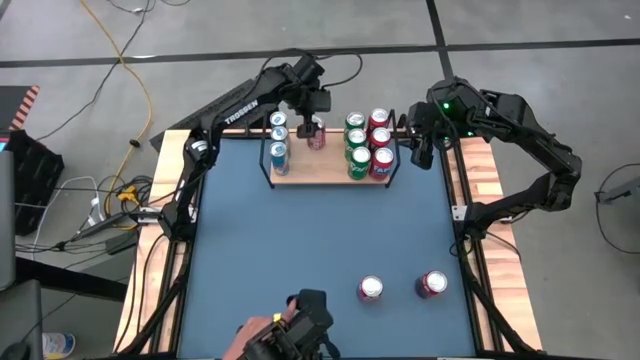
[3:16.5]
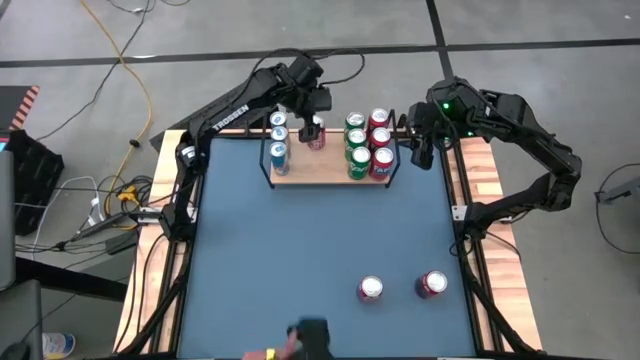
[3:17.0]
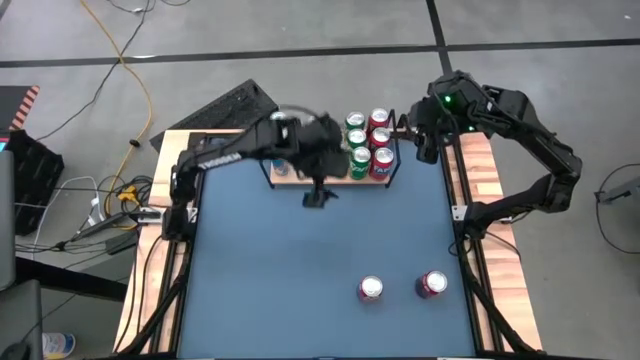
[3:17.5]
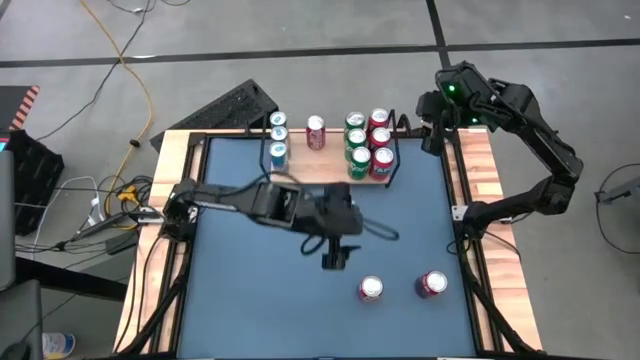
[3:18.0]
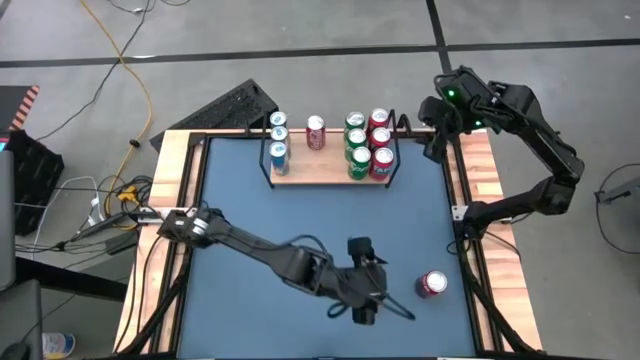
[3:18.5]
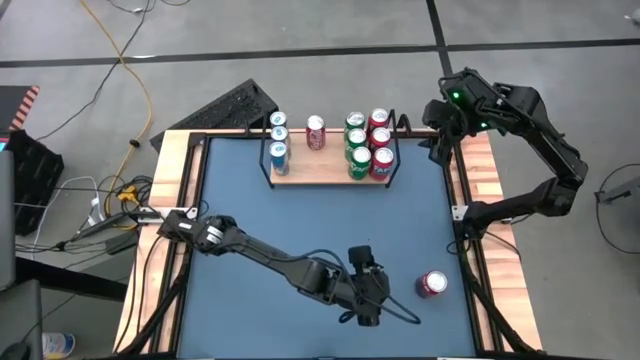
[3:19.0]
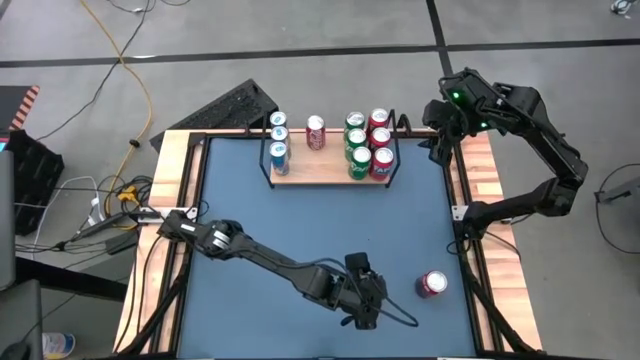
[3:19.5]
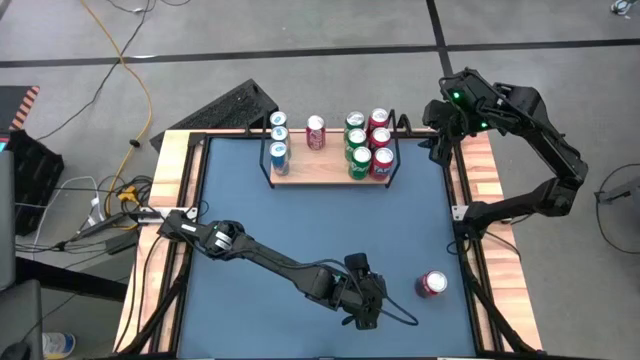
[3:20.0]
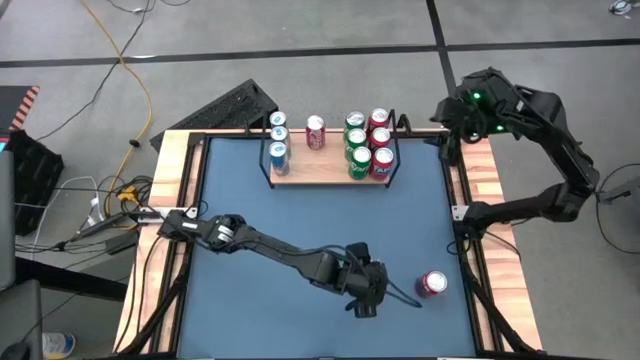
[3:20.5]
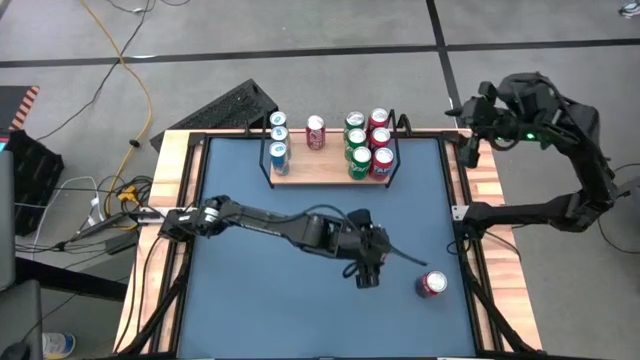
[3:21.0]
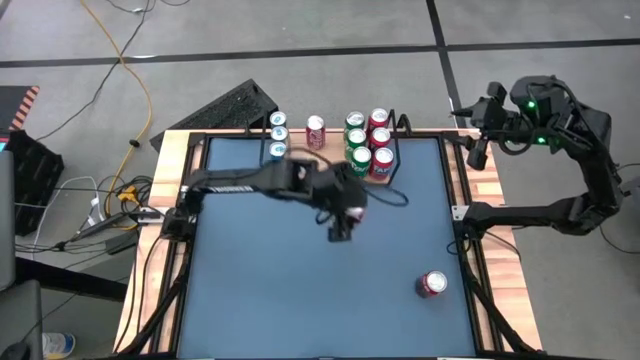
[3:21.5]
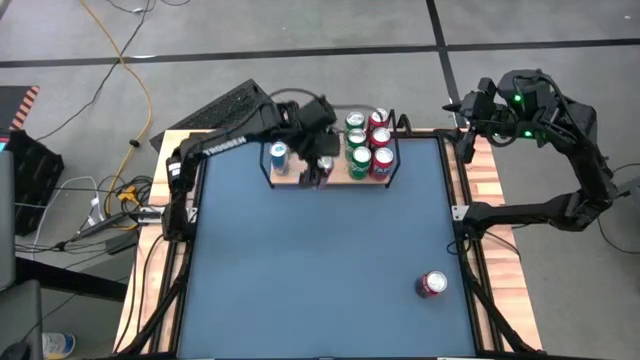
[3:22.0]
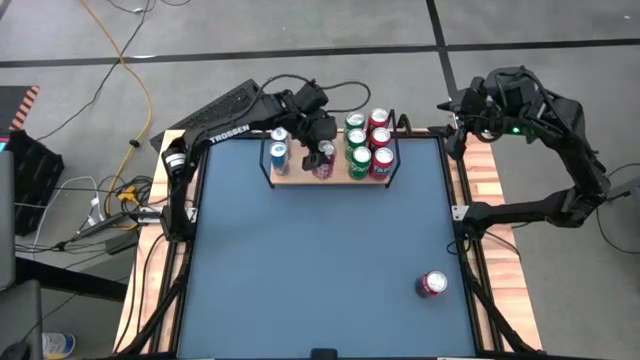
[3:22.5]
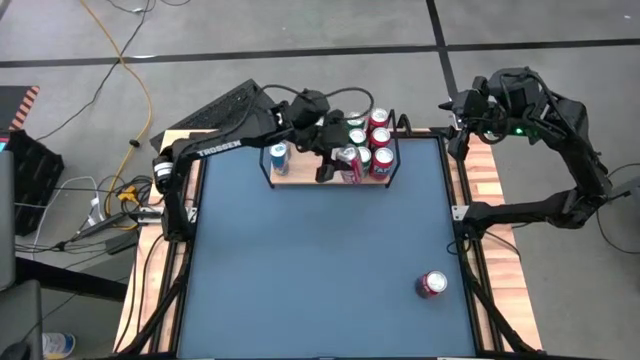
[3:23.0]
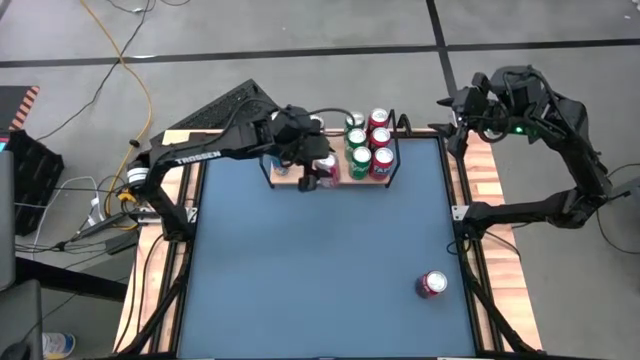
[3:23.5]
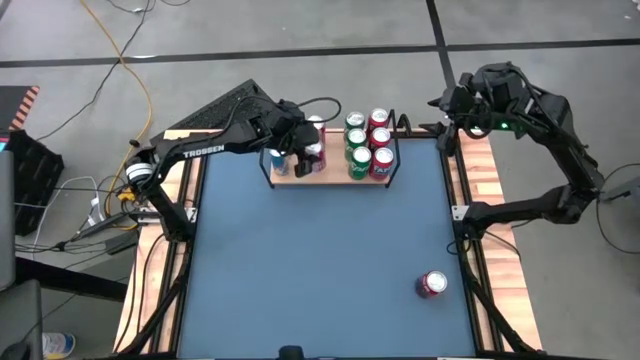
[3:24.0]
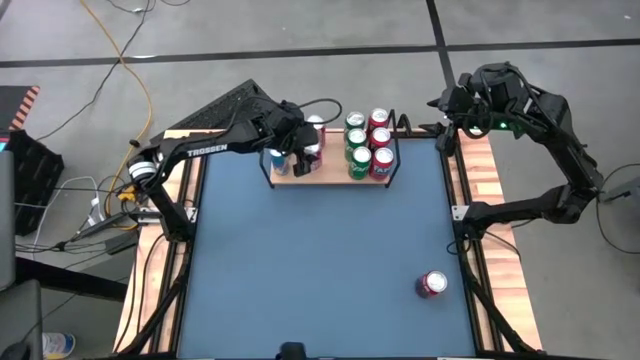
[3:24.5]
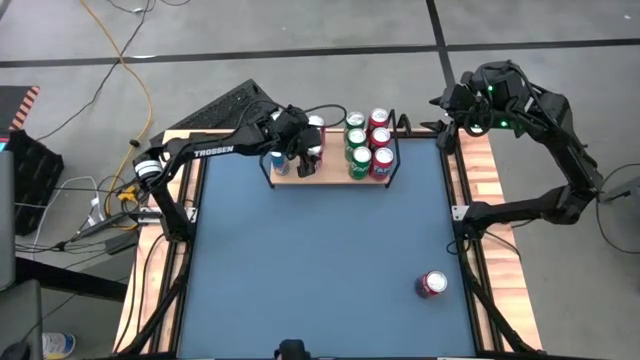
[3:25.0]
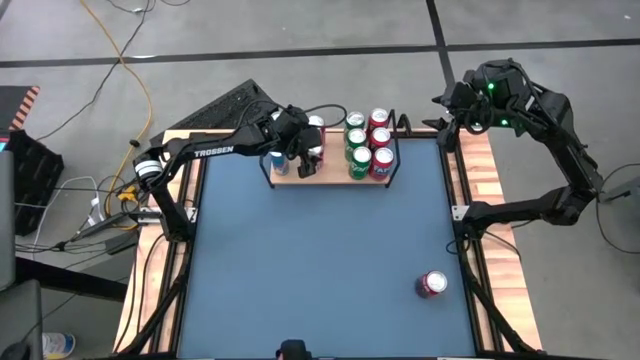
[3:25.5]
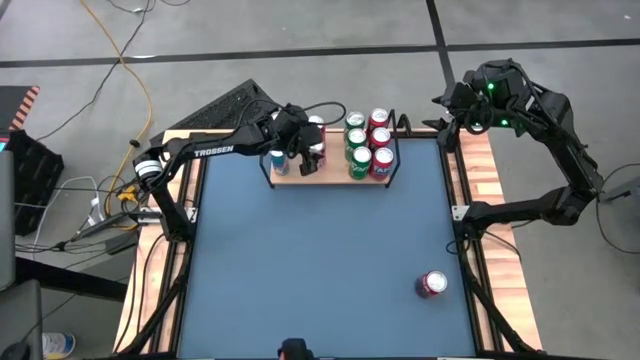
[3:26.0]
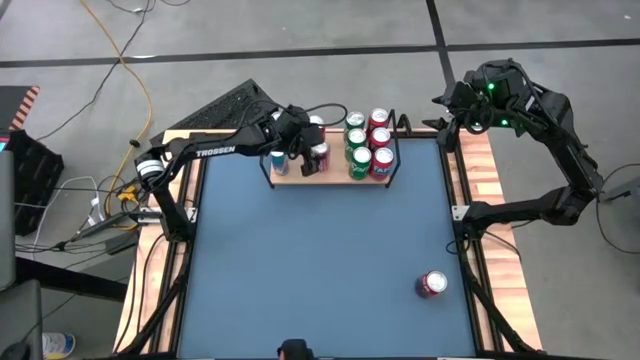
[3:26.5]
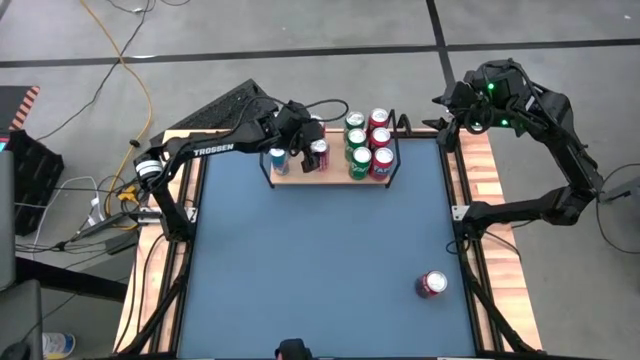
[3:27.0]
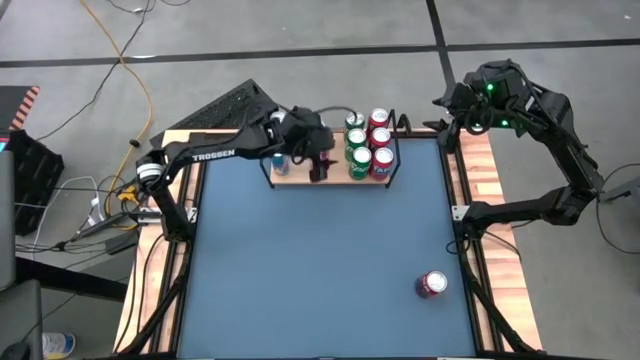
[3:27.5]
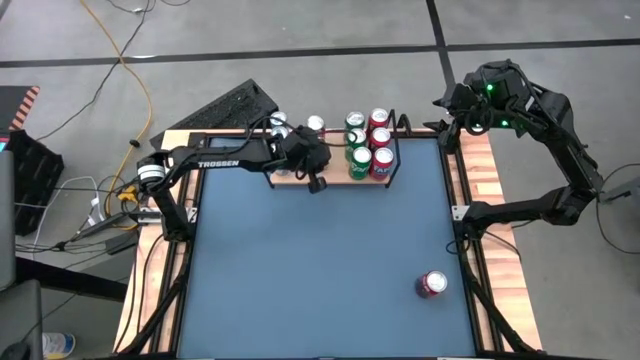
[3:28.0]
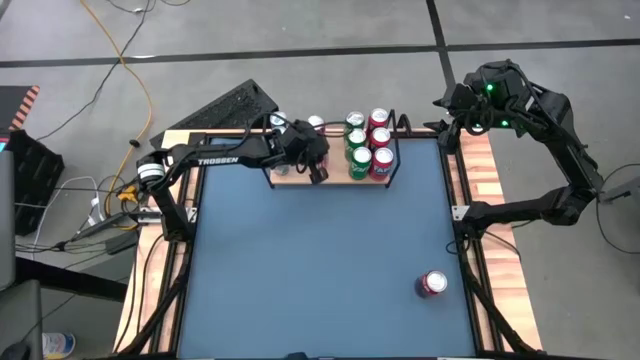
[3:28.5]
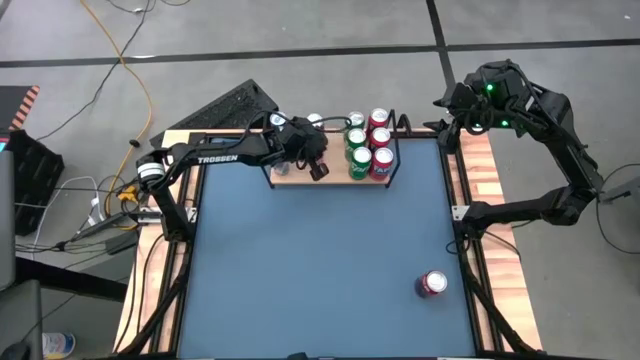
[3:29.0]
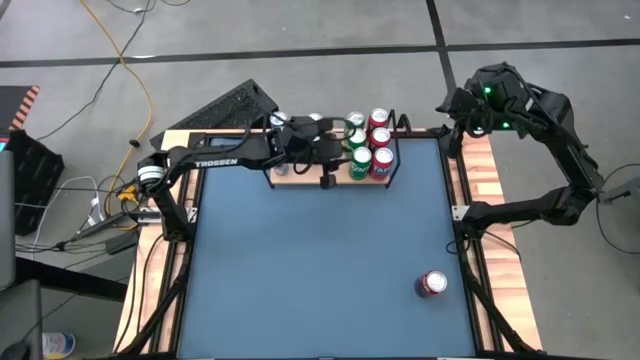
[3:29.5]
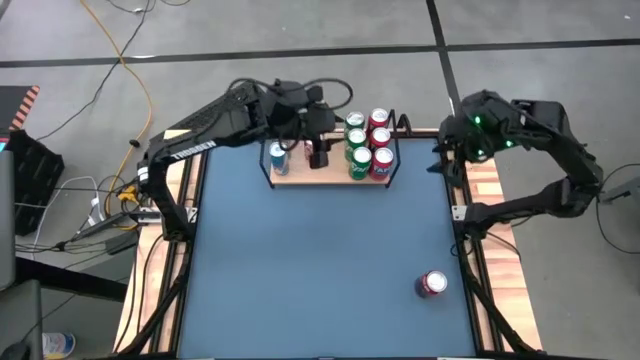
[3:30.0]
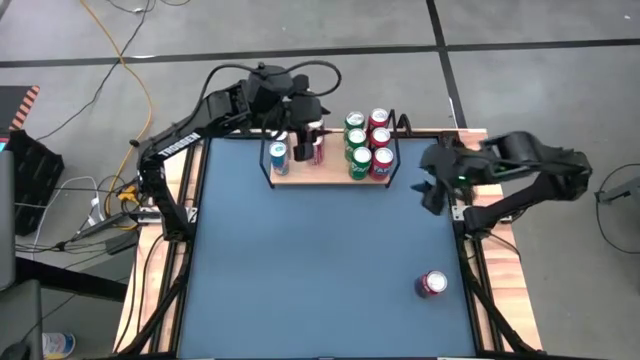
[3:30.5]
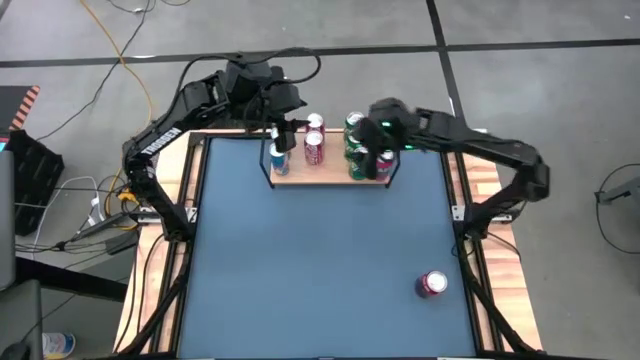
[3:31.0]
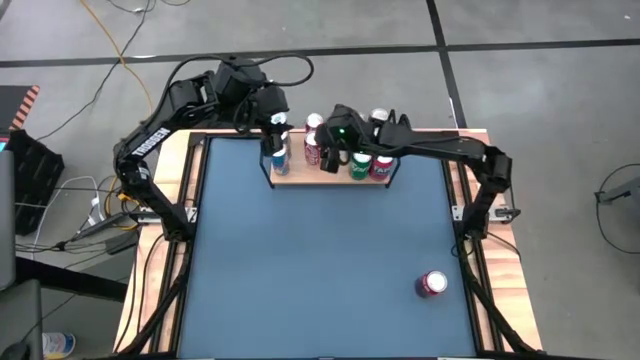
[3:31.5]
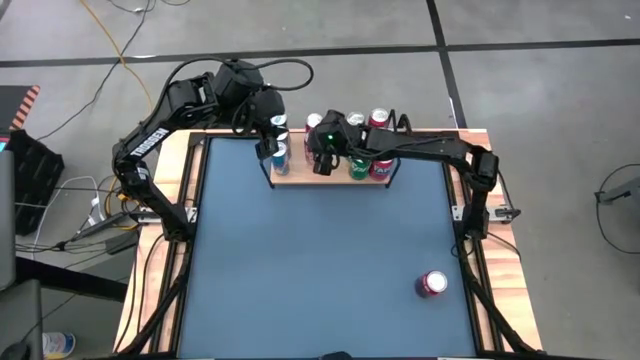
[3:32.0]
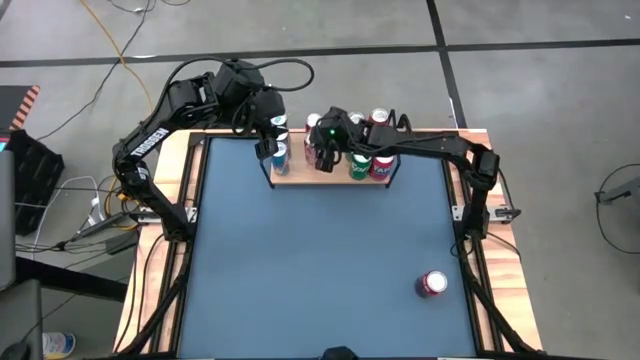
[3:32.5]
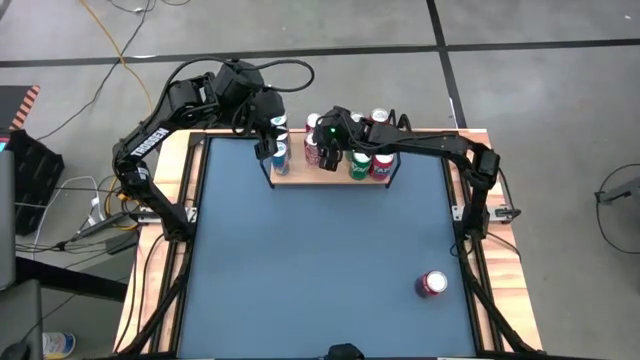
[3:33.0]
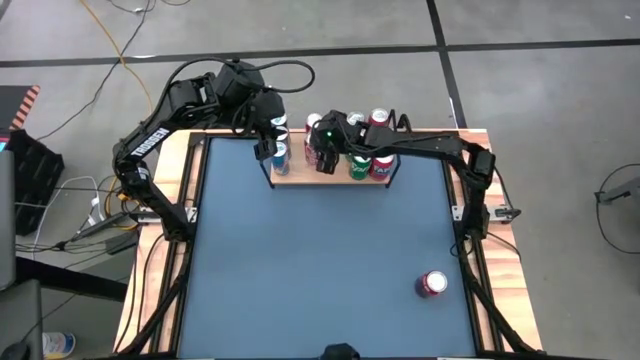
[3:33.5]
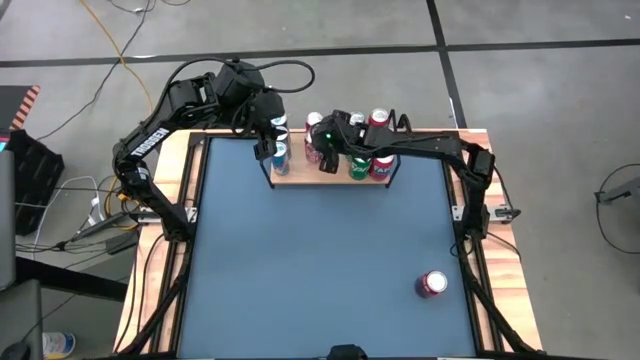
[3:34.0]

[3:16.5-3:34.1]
Task: Place canned beverage on shelf
Put the left red white soda can on the shelf aligned with the other red white soda can
